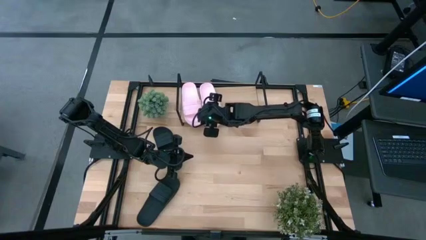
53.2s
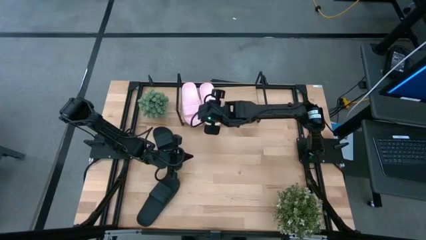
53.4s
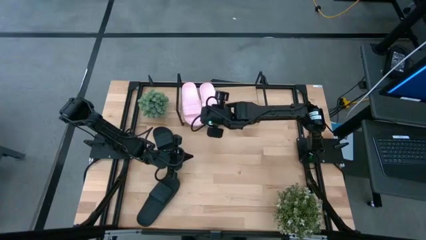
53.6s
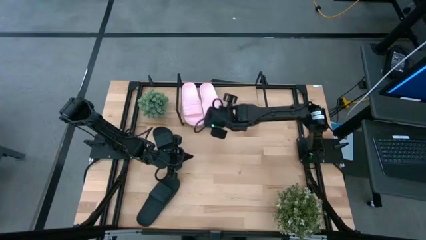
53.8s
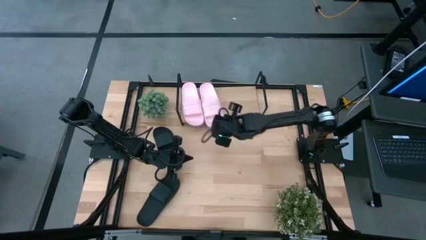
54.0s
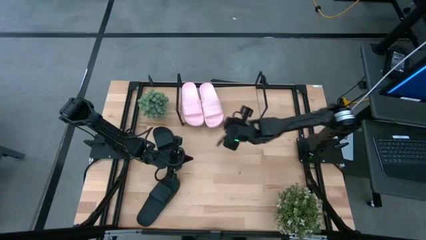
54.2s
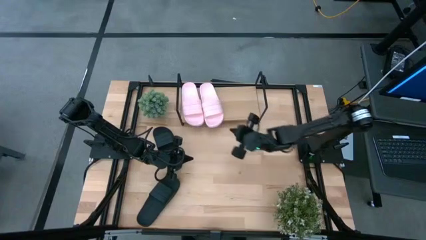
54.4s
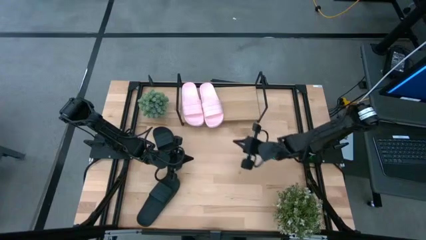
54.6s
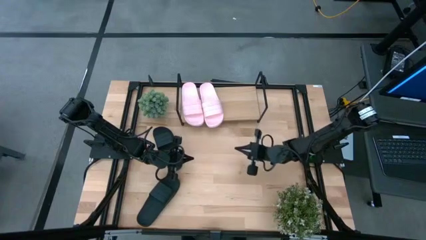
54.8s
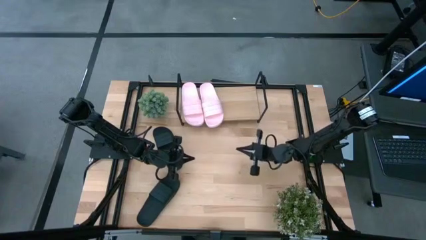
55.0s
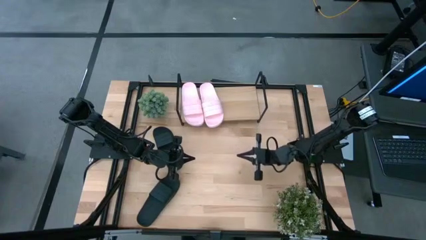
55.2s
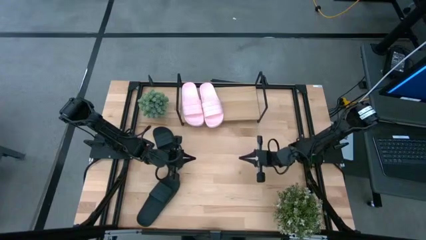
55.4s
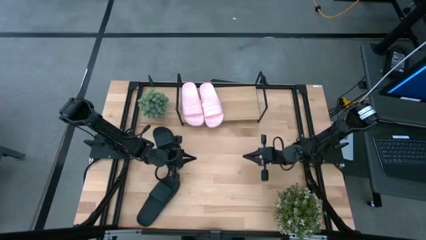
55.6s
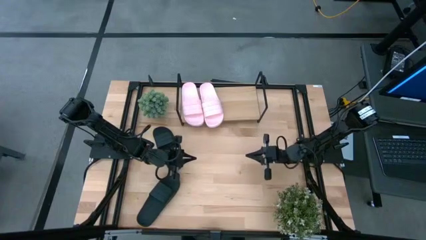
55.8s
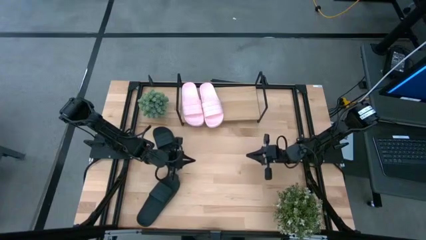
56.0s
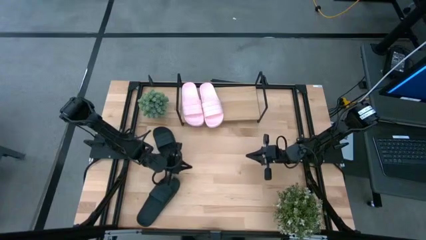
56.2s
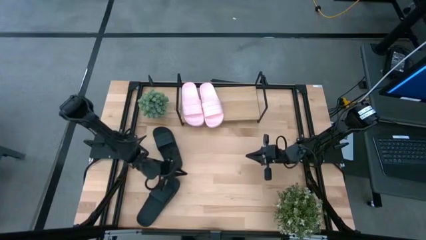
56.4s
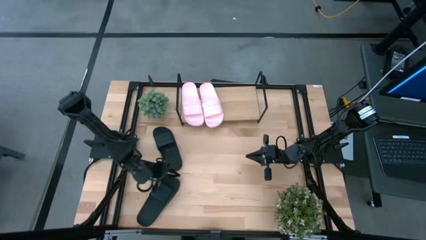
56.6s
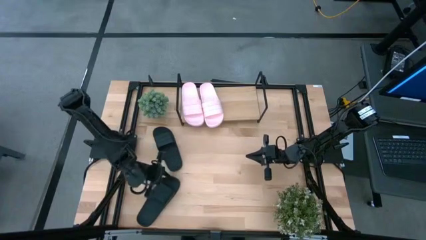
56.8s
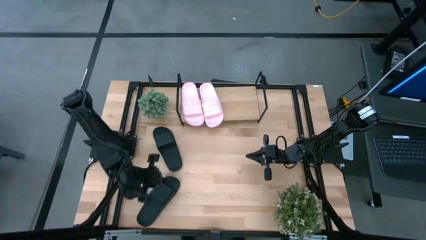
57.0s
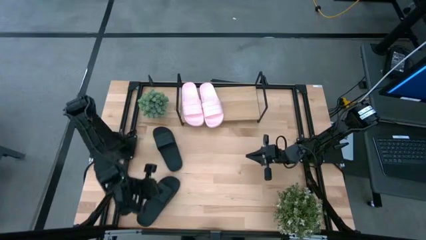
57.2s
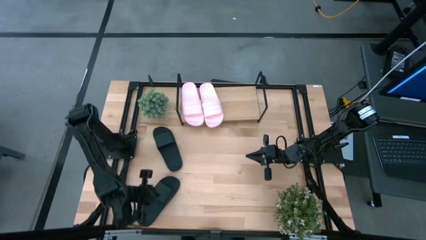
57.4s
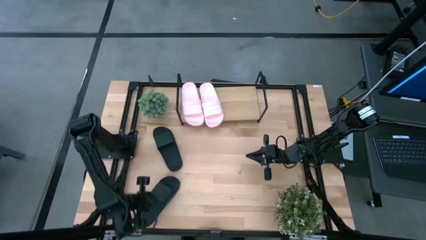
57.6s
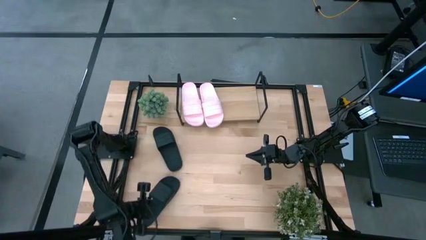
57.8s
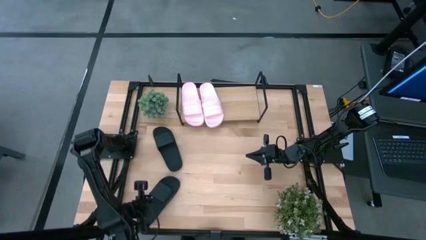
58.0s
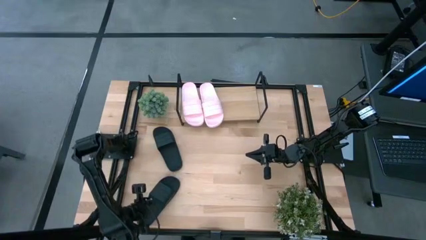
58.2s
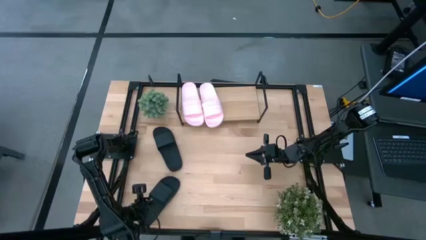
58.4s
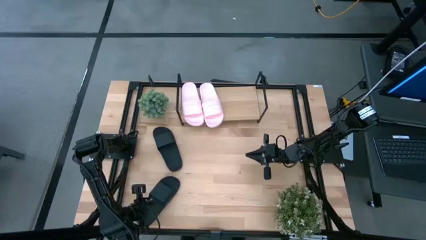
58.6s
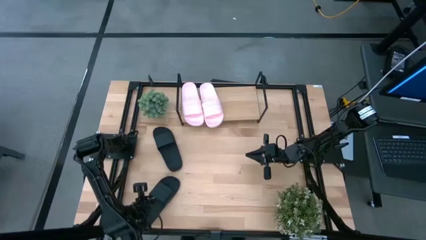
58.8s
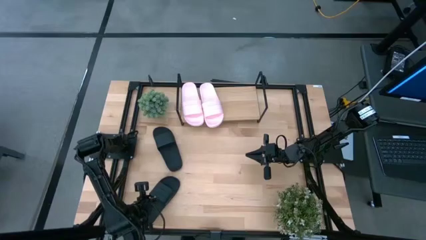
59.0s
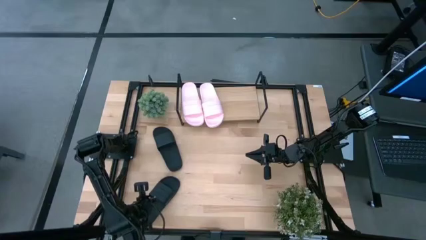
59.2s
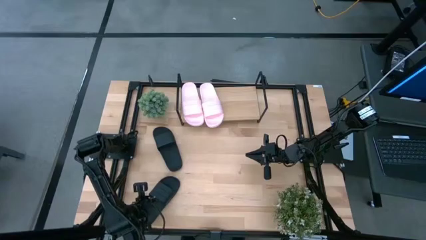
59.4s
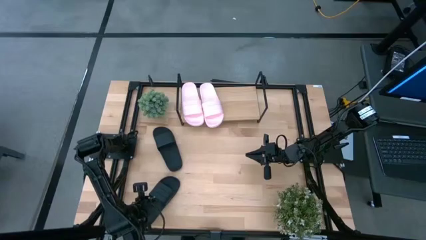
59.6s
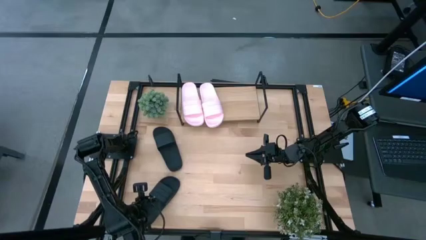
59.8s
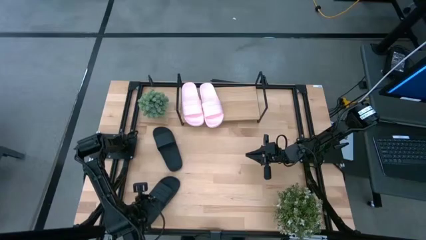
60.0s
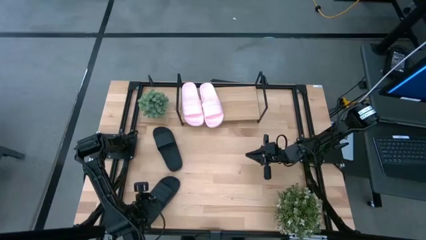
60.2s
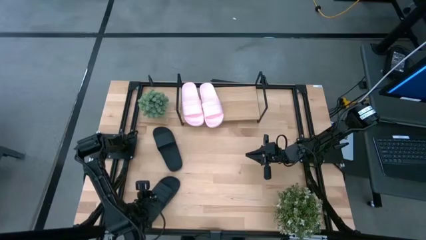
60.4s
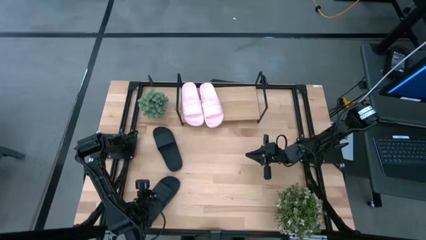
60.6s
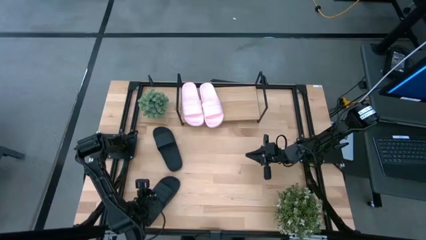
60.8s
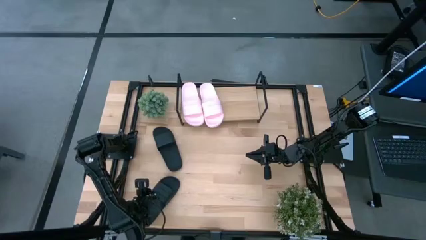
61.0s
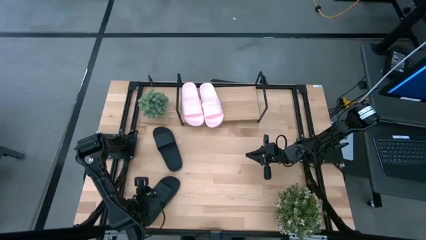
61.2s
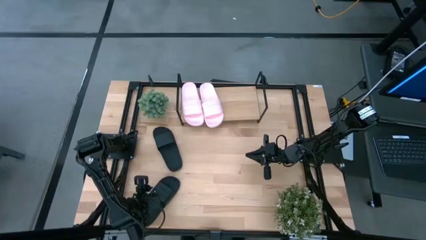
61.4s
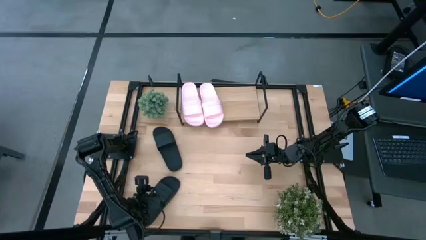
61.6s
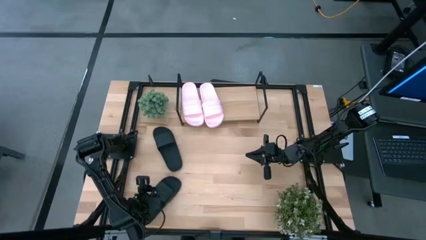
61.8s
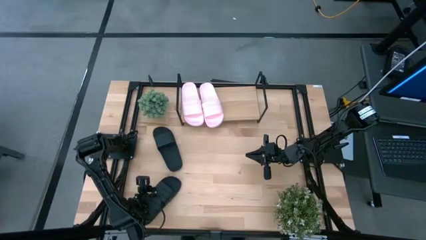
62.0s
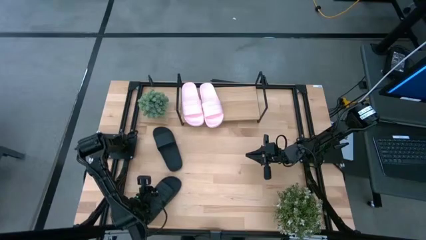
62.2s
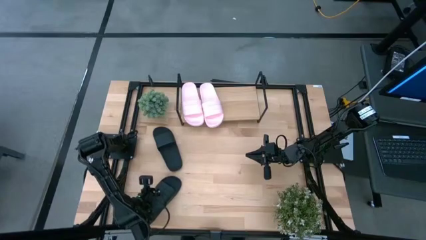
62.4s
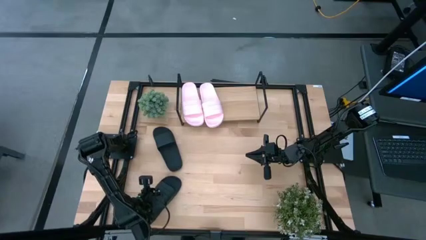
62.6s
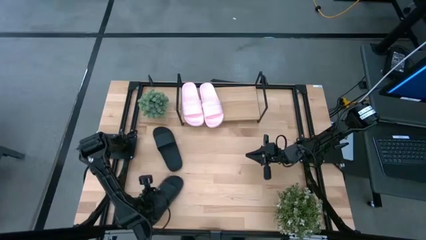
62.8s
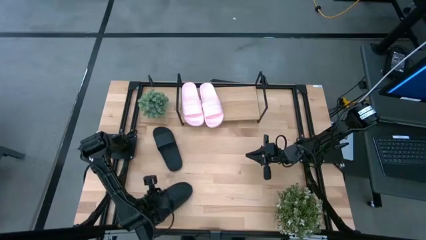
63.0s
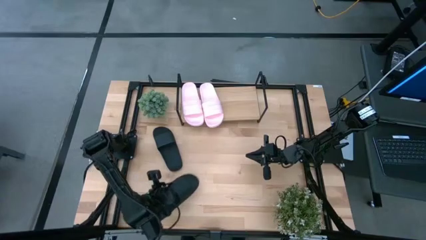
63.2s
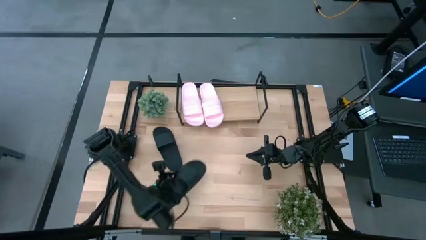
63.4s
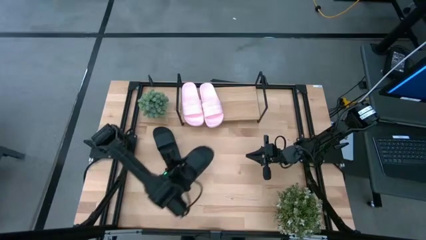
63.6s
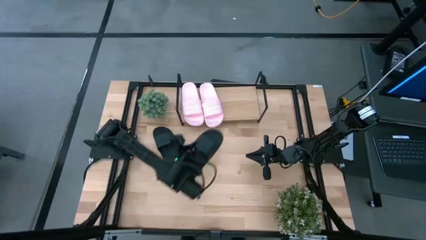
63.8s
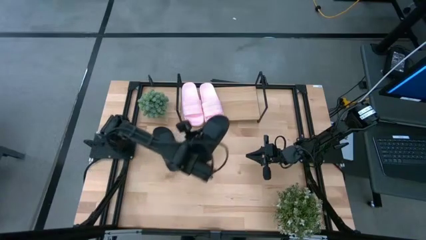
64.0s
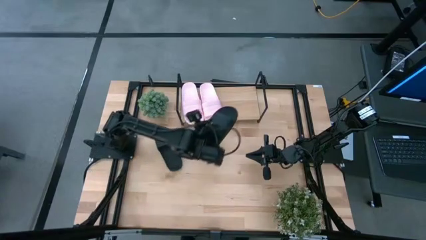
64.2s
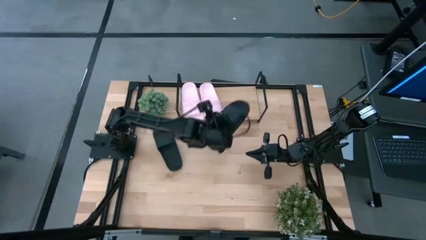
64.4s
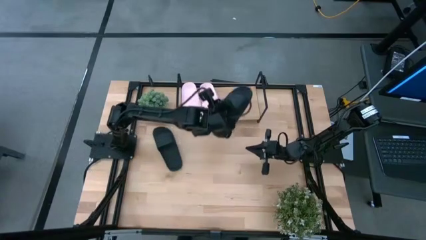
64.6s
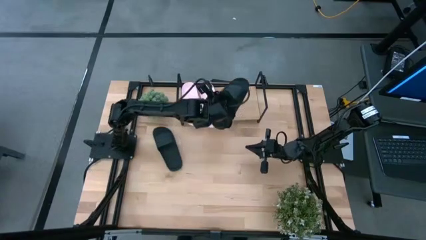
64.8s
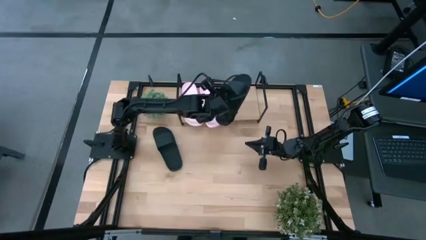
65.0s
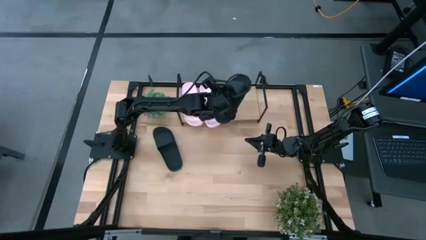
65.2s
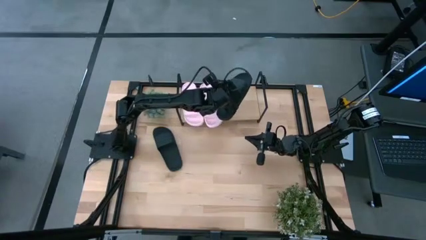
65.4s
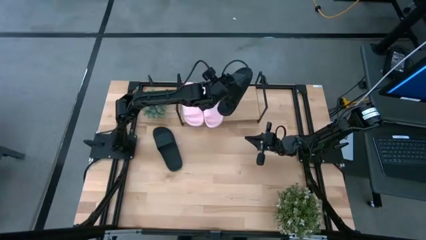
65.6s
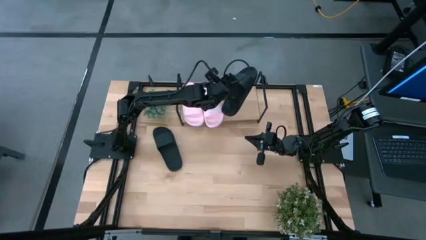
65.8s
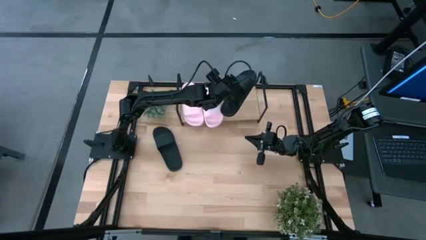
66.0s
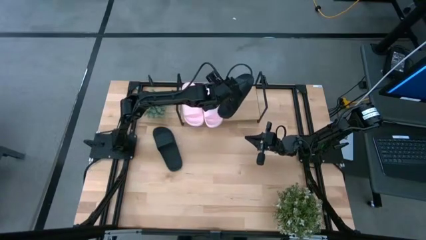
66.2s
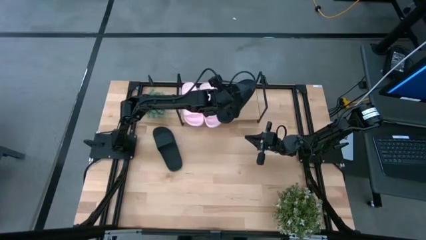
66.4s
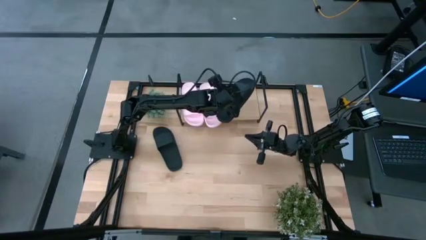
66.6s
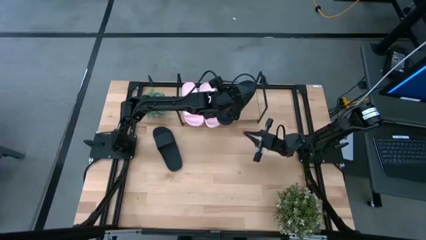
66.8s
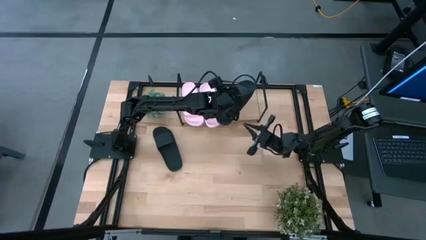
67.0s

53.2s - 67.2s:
Task: Pick and place slides into the shelf
Put the bottom black slides on the shelf

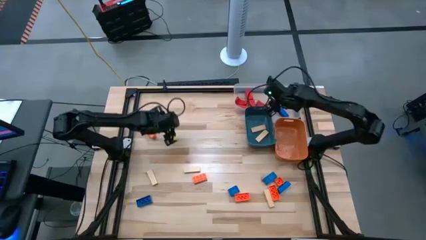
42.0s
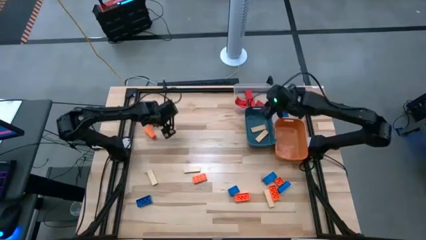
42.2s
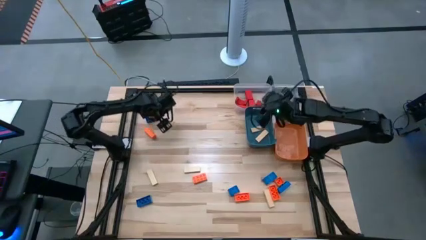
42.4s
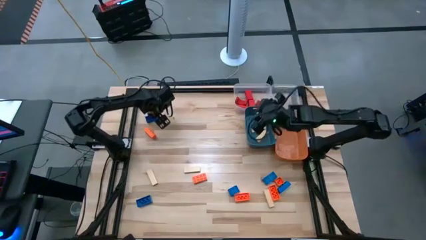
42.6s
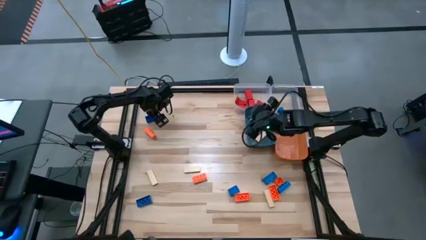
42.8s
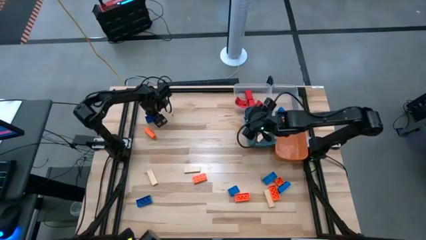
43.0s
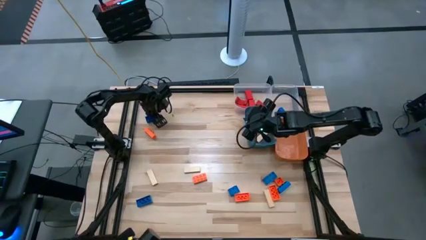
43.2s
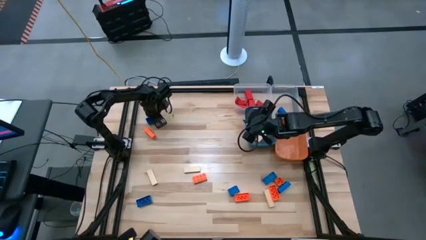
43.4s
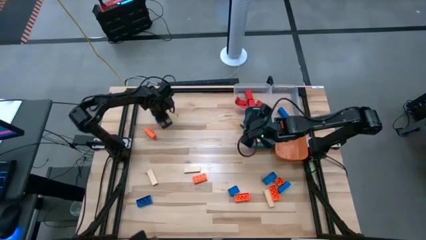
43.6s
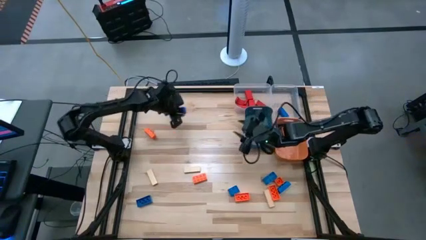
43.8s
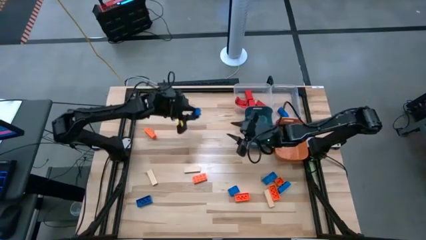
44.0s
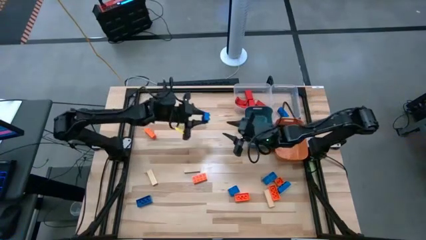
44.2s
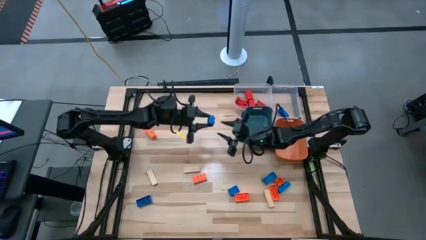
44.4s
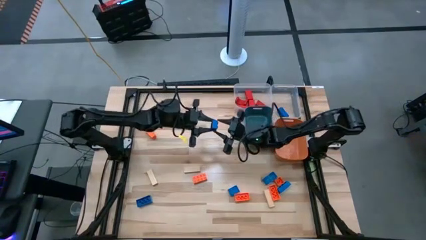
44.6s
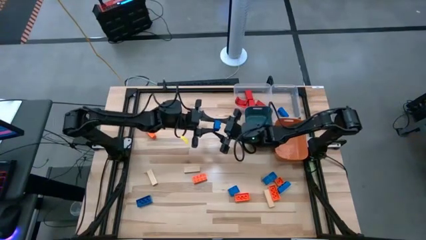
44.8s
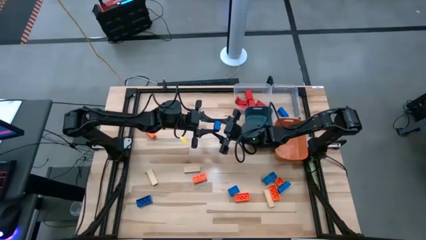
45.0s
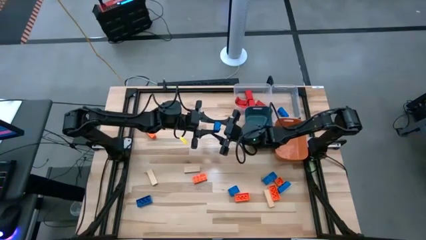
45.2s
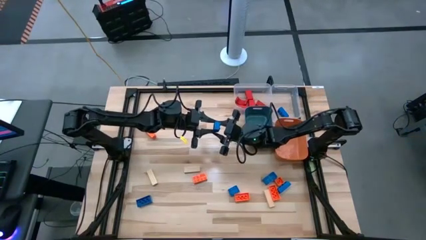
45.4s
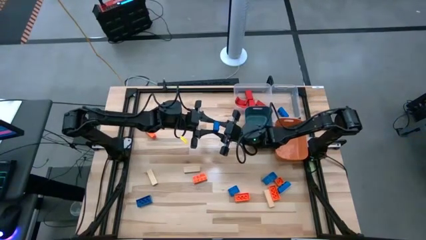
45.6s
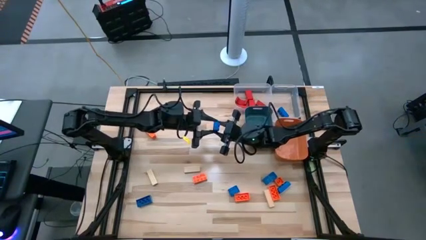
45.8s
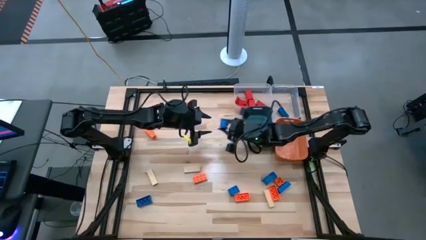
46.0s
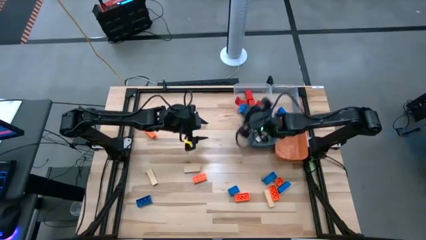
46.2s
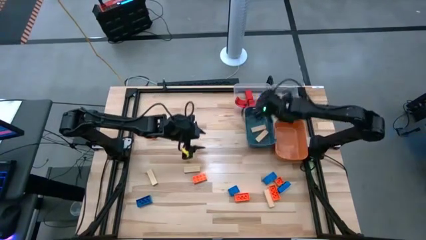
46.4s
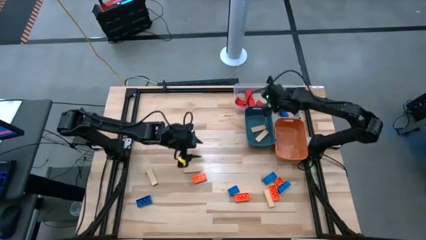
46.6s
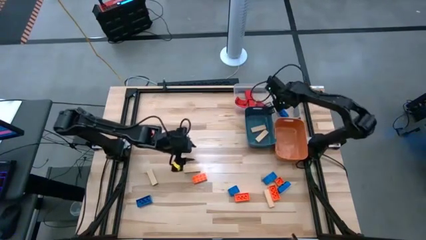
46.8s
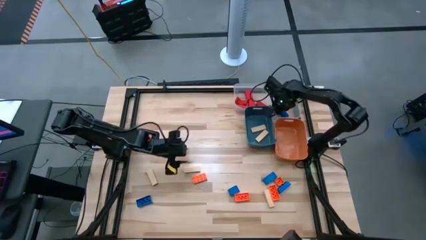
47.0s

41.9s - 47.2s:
Task: Sort blocks
Put the 8 stud blue game piece into the right transparent bin
